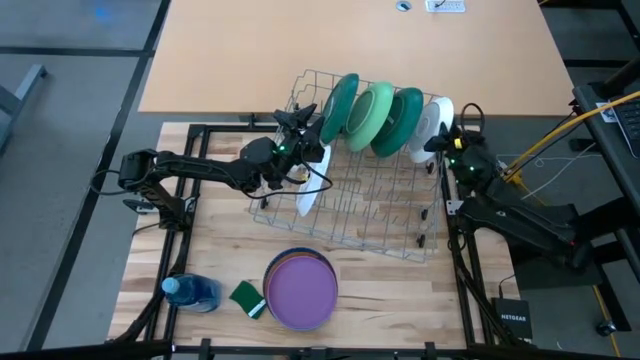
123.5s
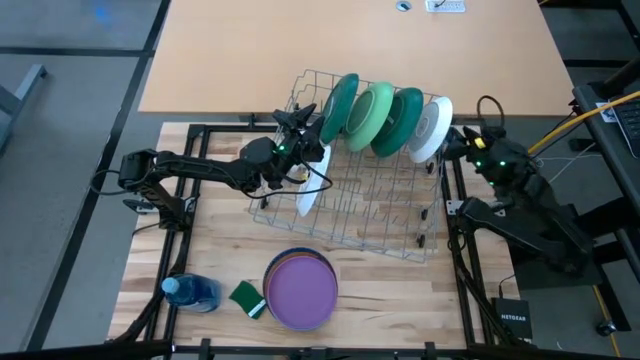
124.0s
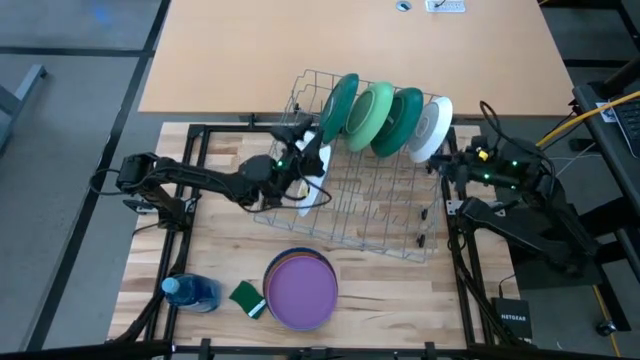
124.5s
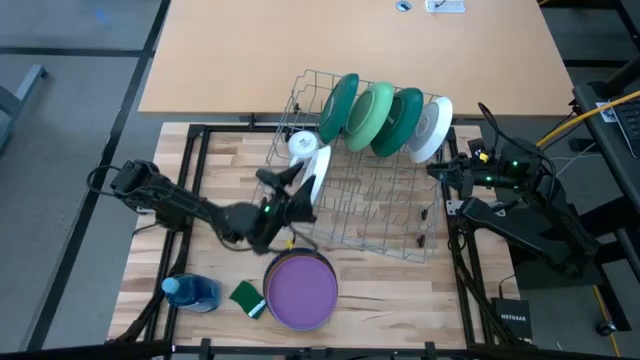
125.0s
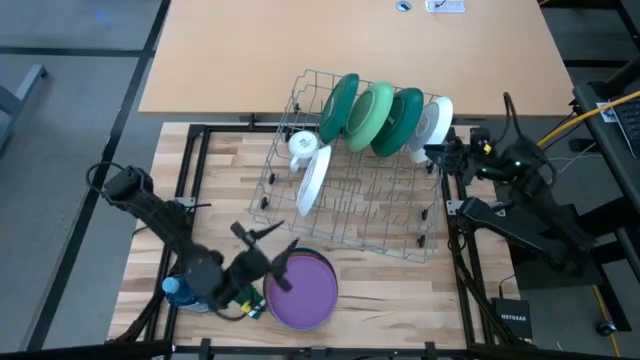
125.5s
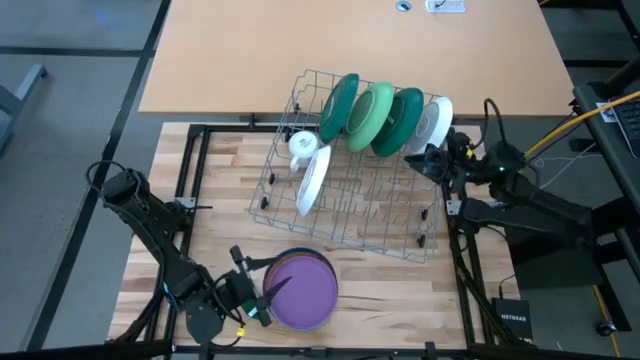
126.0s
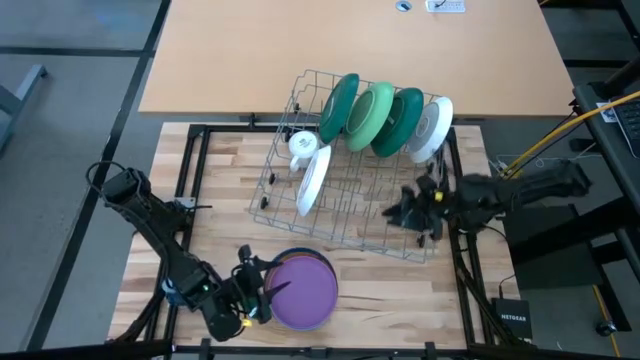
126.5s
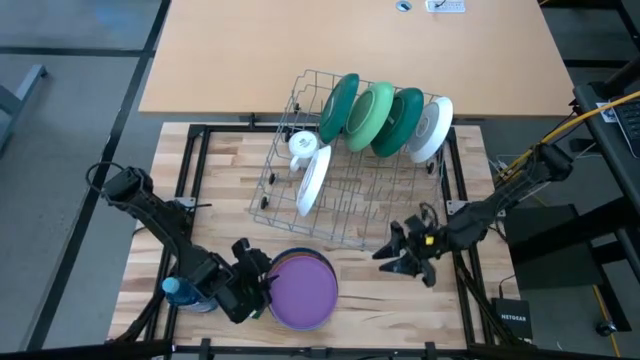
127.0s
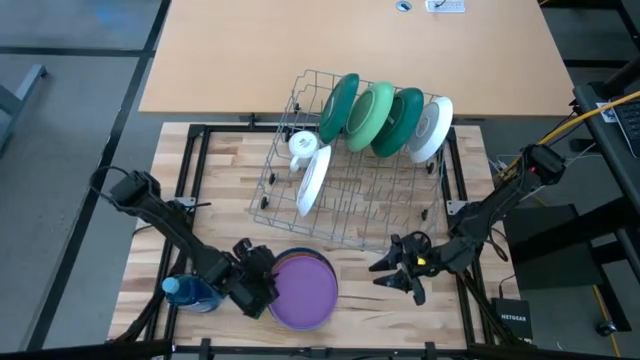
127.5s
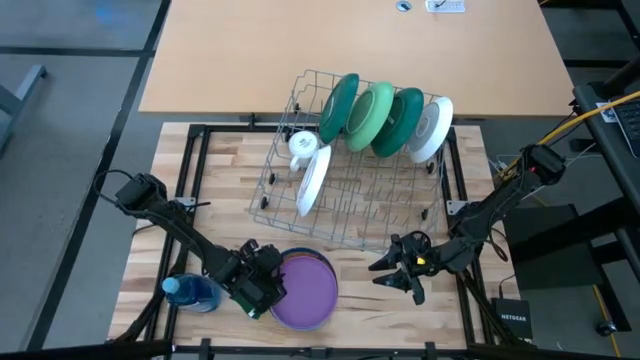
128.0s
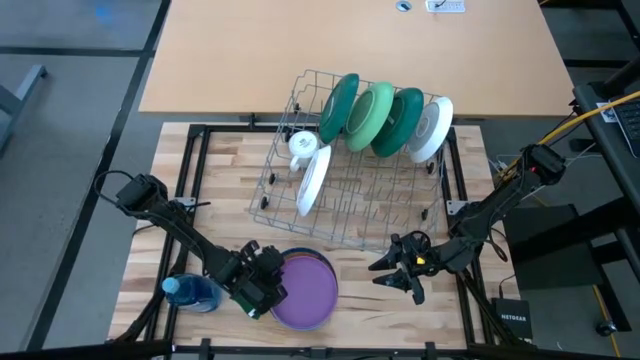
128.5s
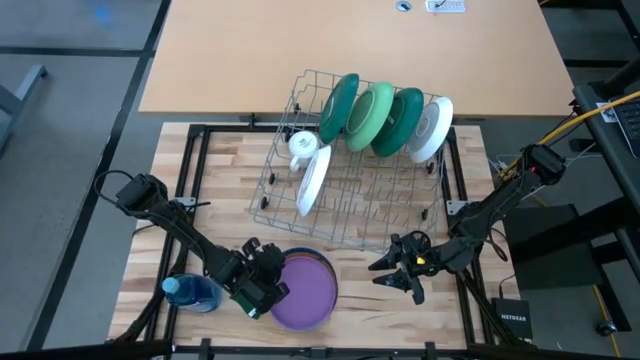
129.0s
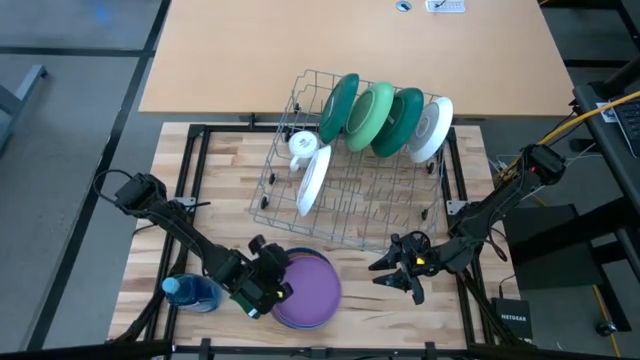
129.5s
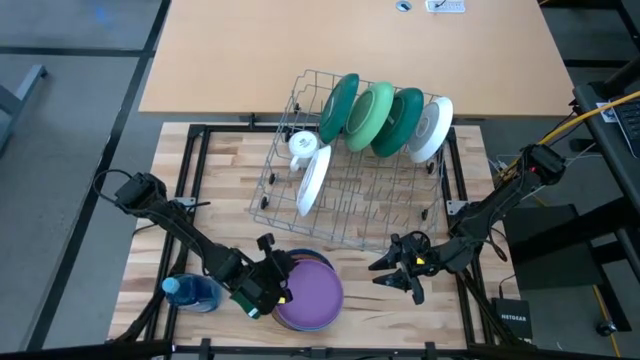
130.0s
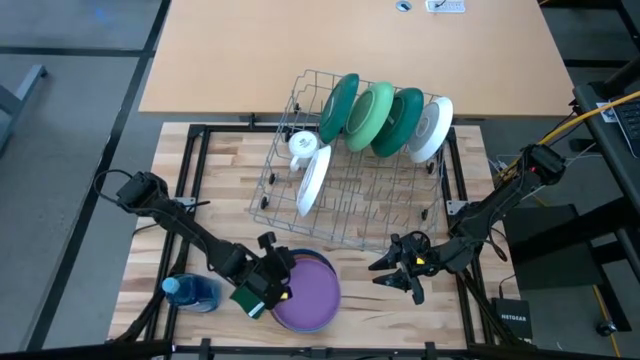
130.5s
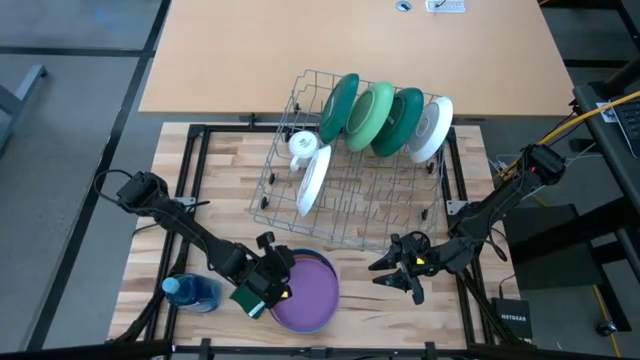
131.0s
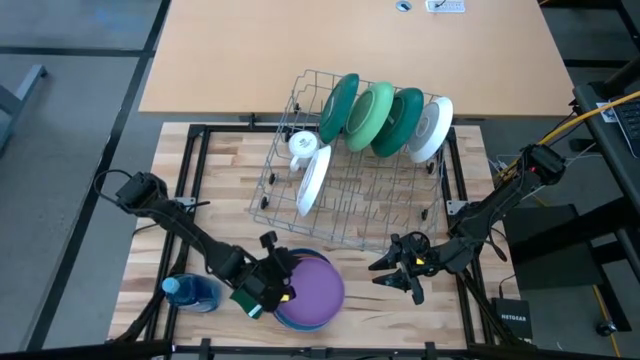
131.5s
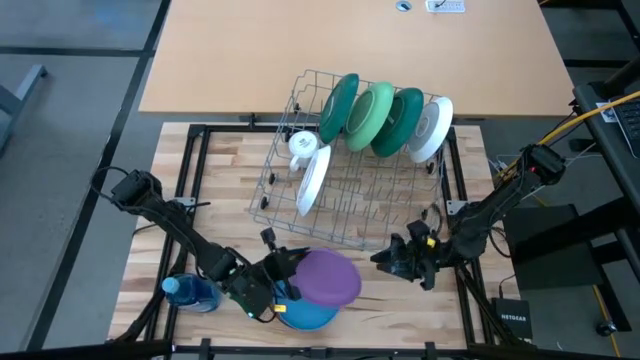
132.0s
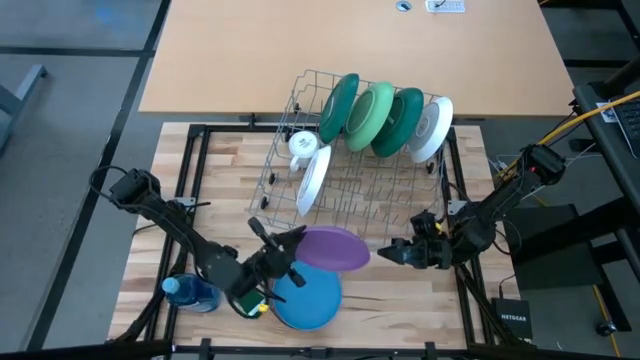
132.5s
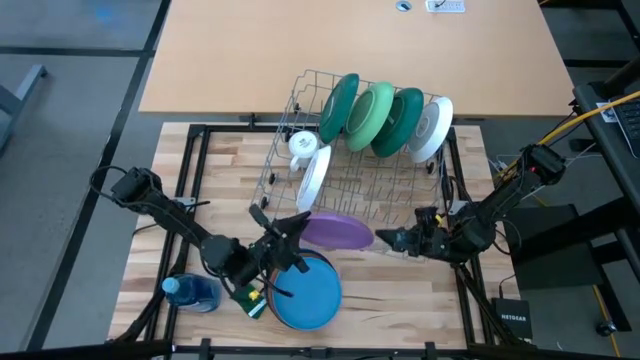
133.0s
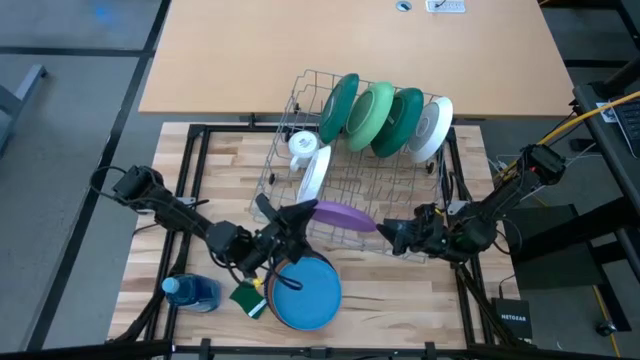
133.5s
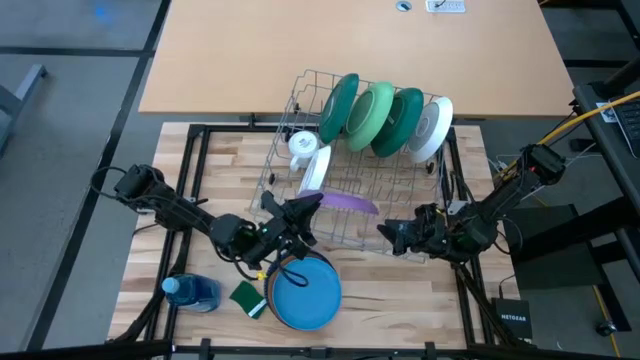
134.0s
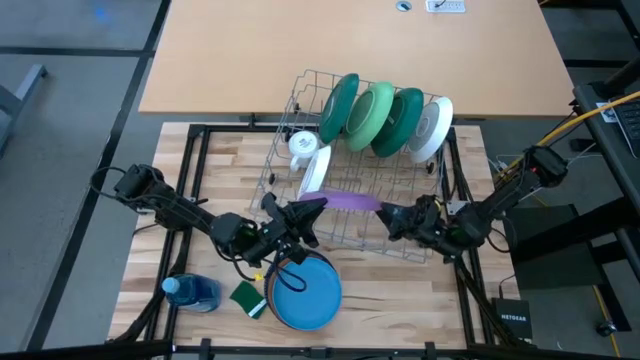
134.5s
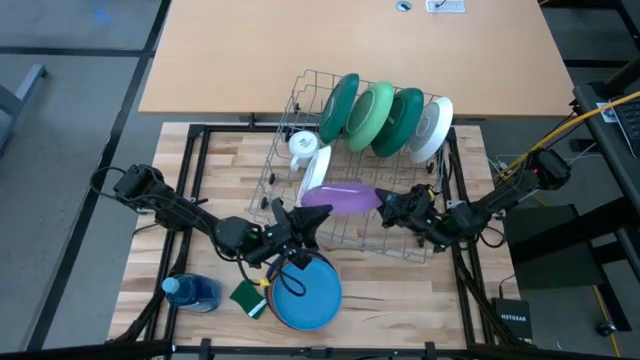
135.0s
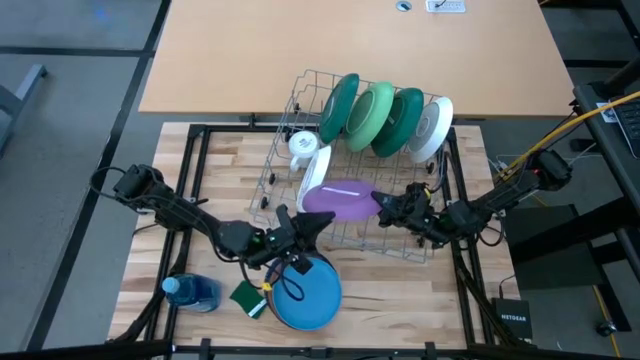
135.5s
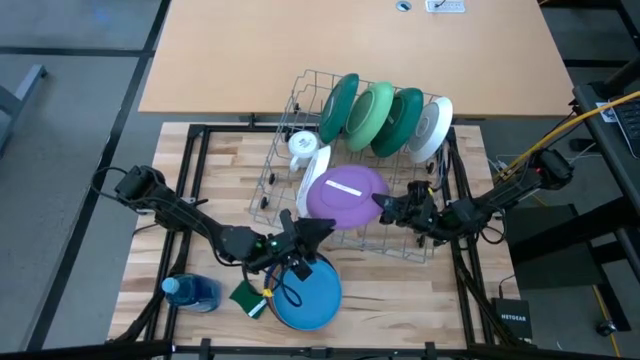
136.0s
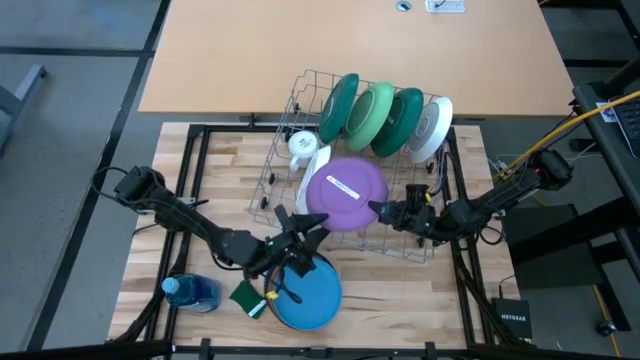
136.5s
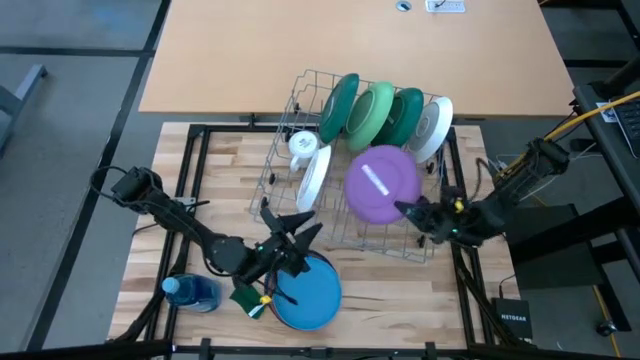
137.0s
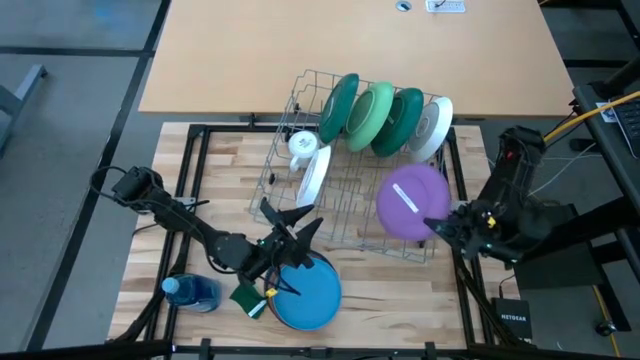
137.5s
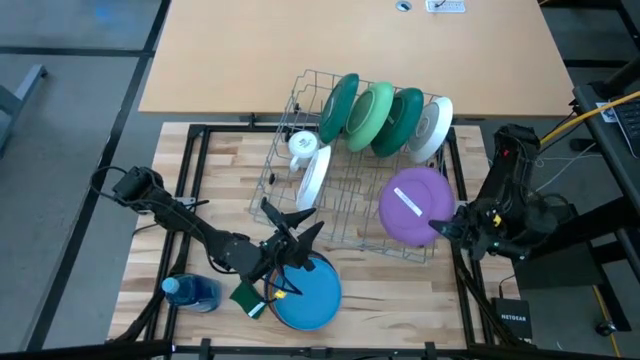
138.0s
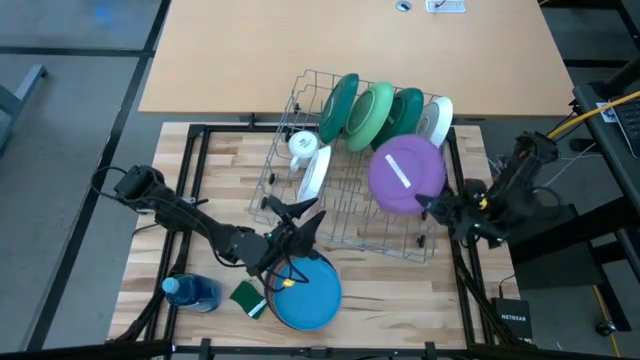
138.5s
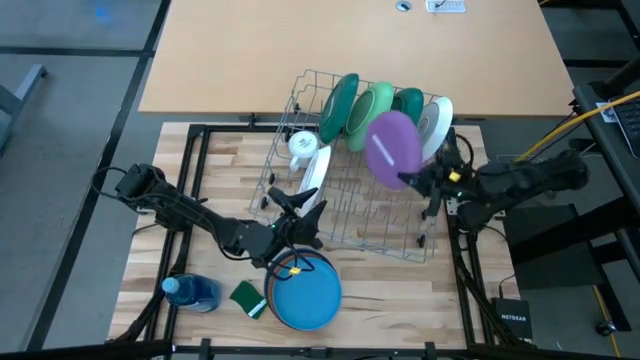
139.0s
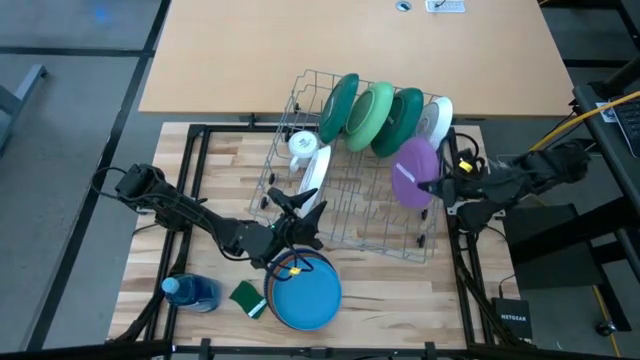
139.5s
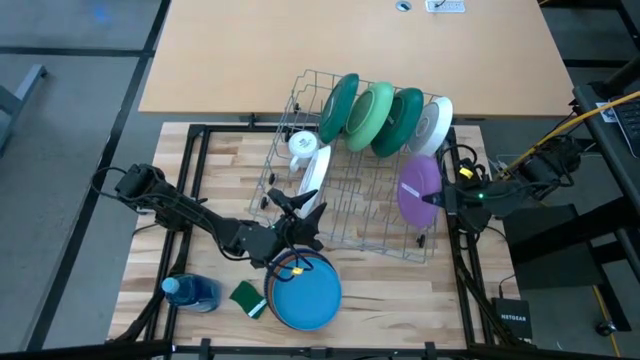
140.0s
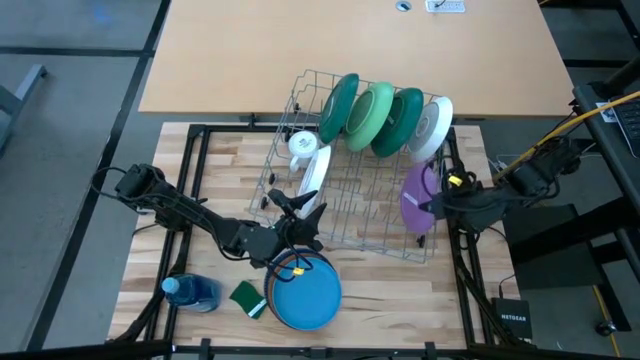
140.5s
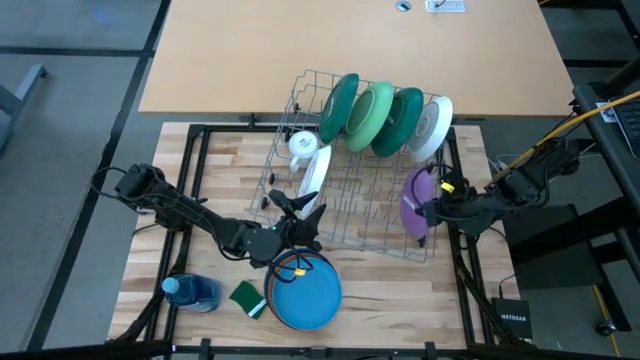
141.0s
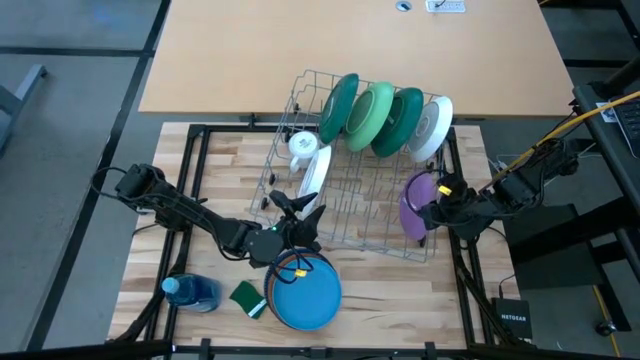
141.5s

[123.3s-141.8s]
Task: Sort dishes
Put the purple plate in the dish rack

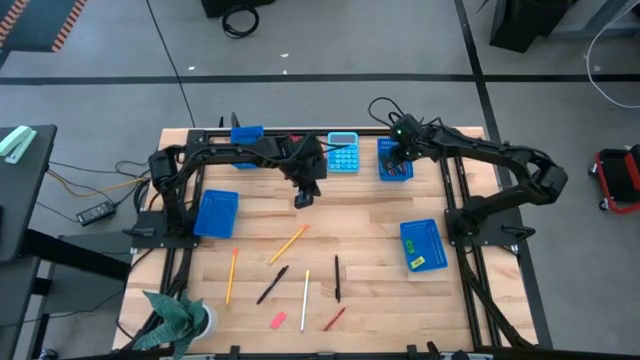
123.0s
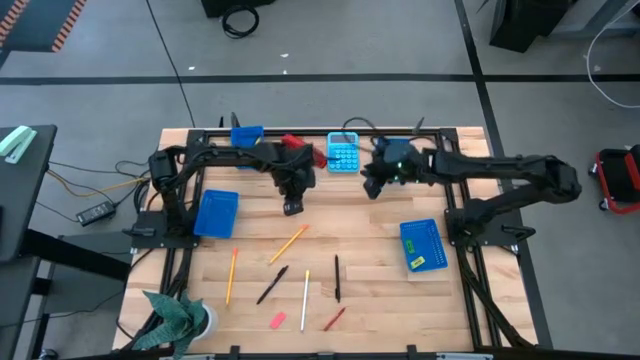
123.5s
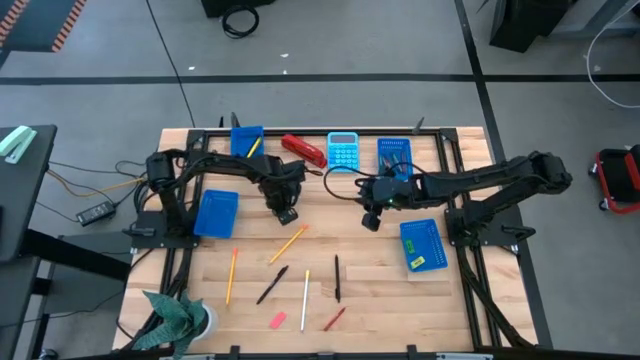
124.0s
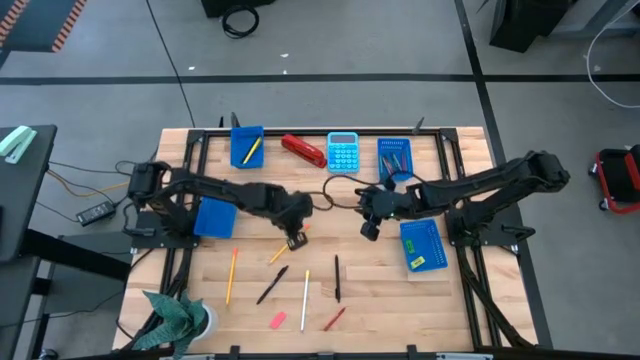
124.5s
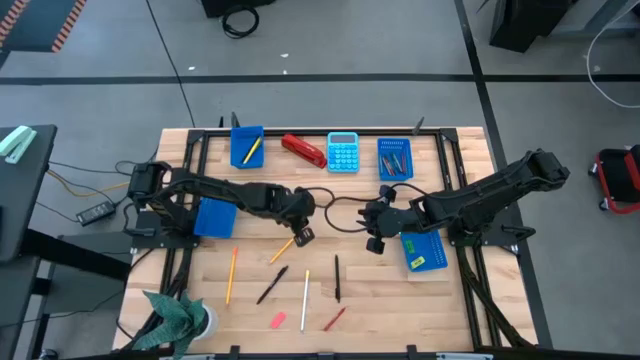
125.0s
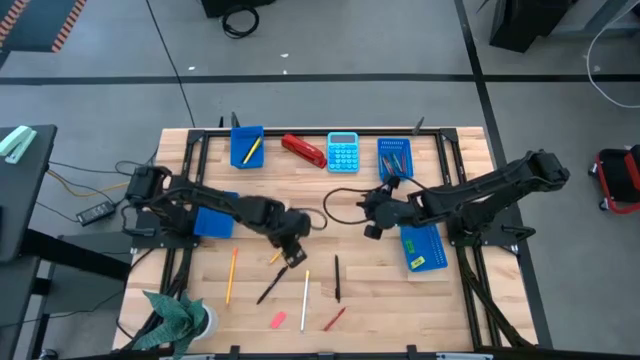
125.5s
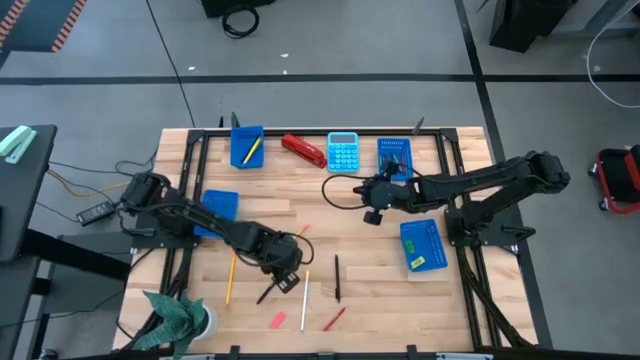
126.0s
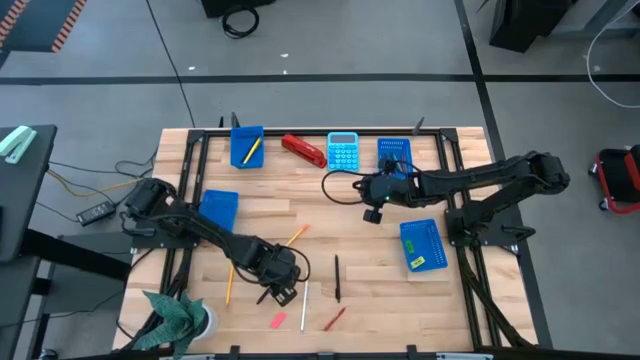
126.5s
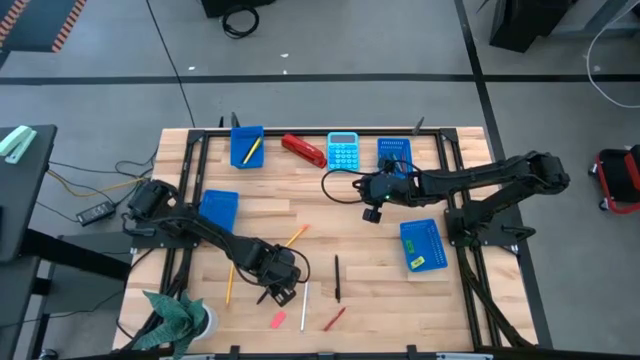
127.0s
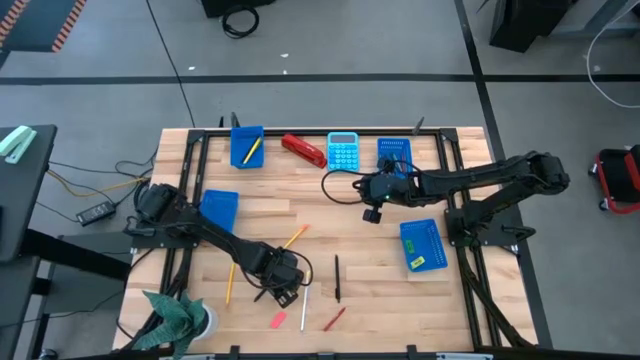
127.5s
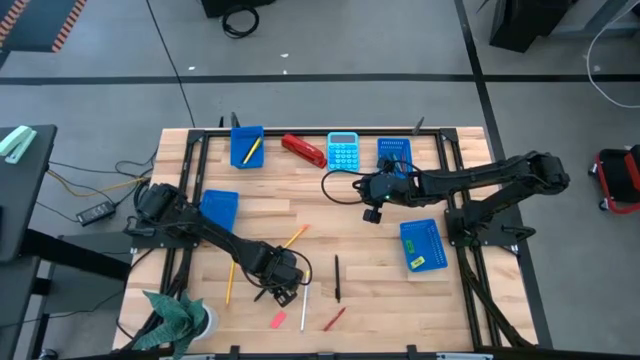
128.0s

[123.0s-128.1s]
Task: Sort crayons/erasers/pens/pencils in bins
Put the left black pen into the top left bin
